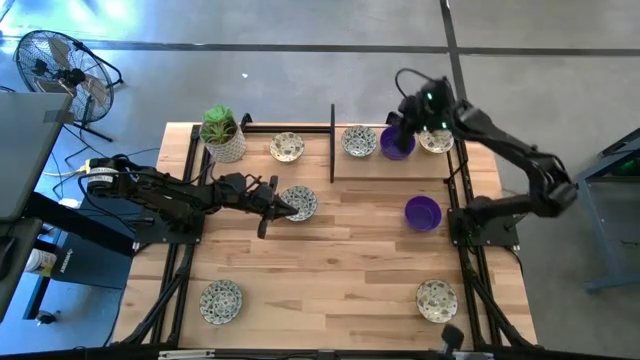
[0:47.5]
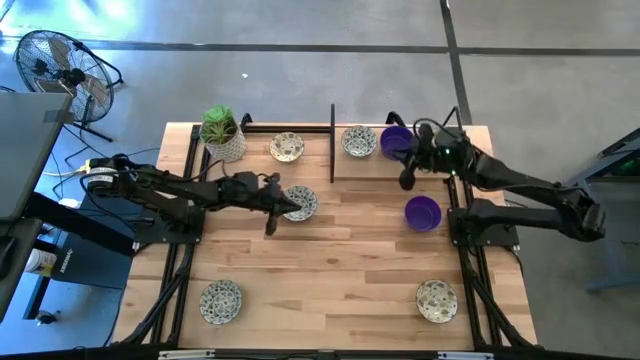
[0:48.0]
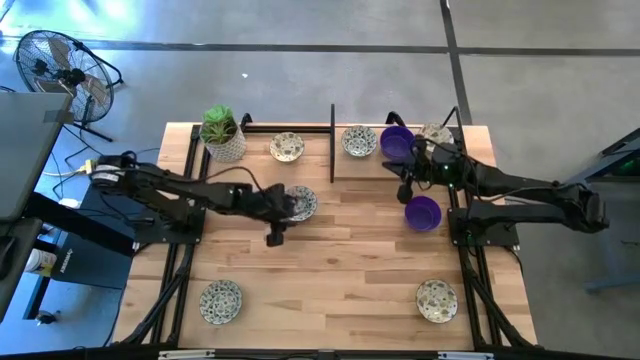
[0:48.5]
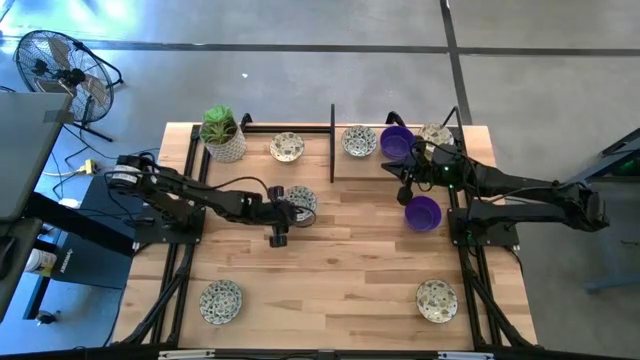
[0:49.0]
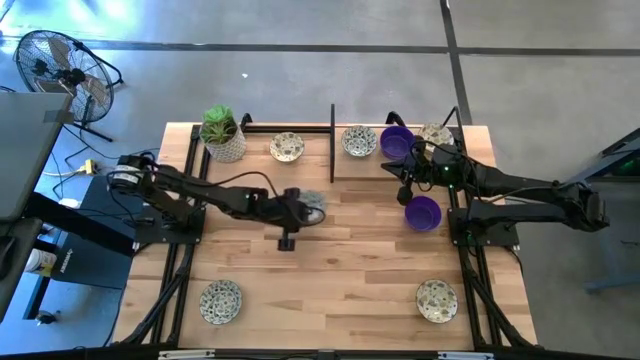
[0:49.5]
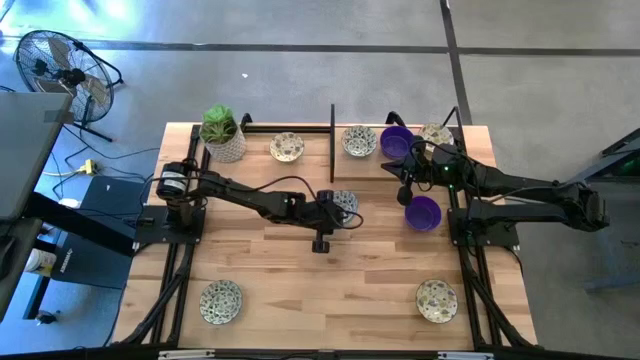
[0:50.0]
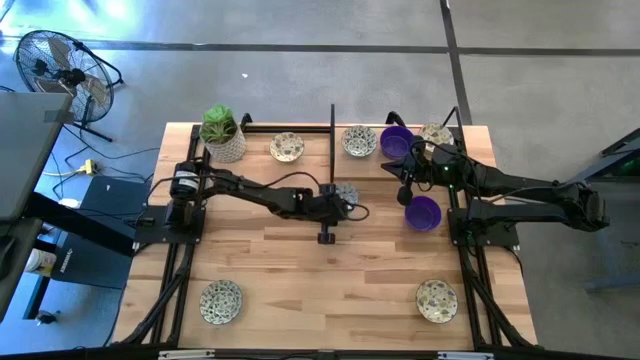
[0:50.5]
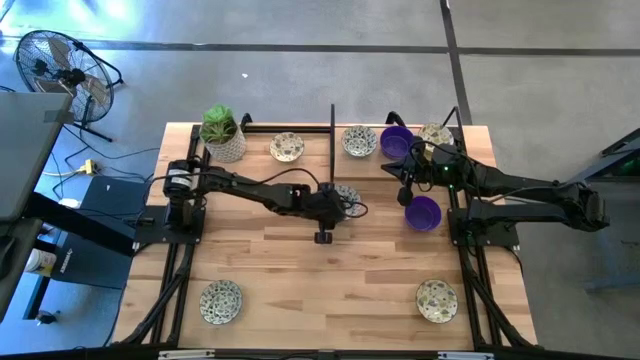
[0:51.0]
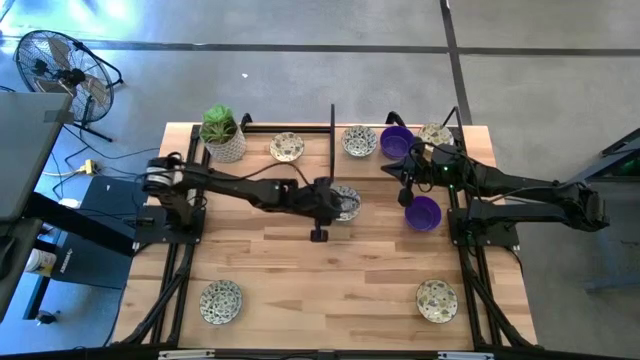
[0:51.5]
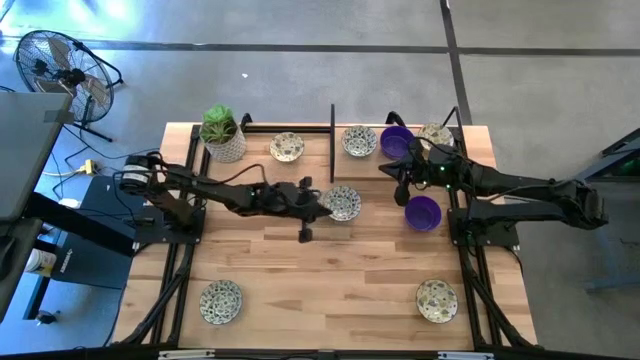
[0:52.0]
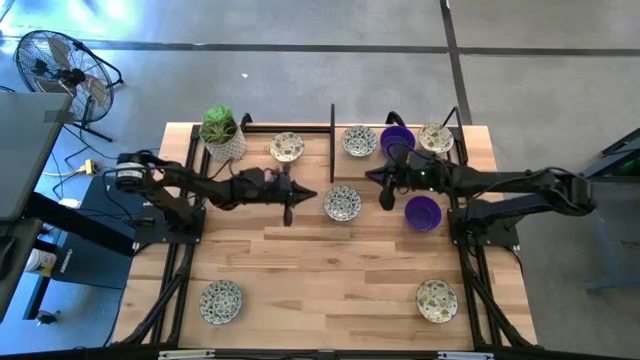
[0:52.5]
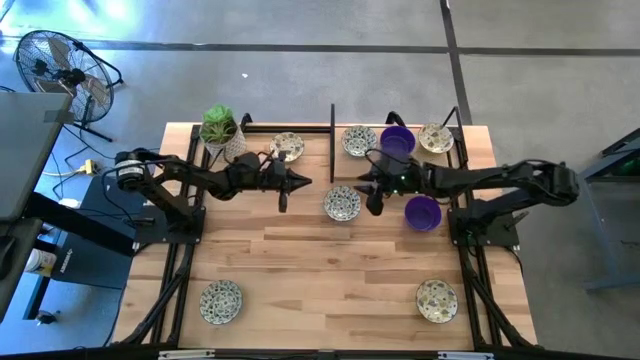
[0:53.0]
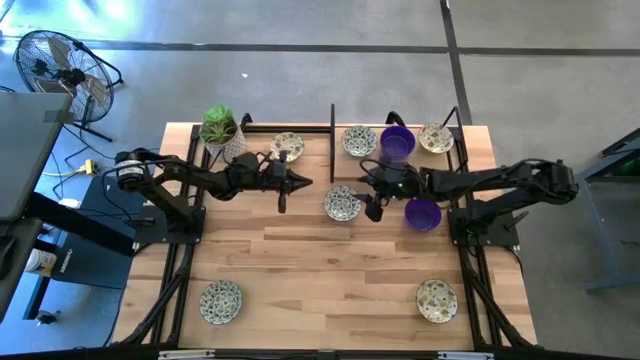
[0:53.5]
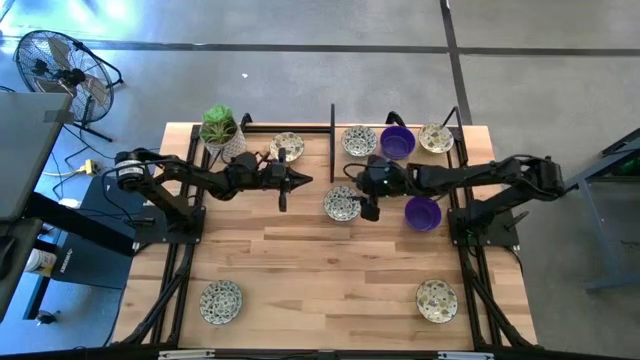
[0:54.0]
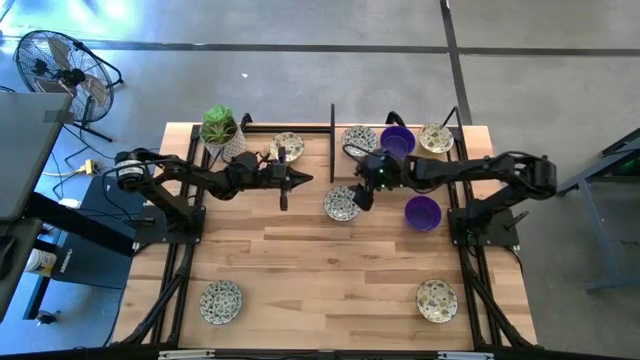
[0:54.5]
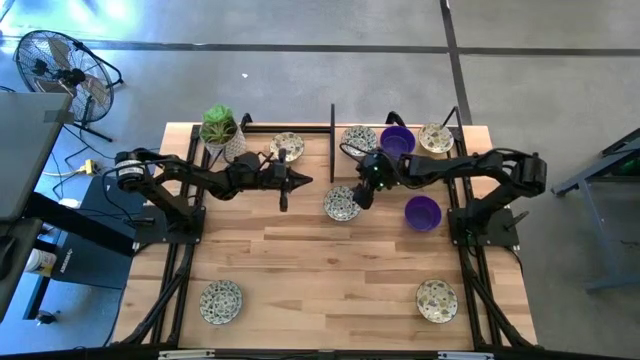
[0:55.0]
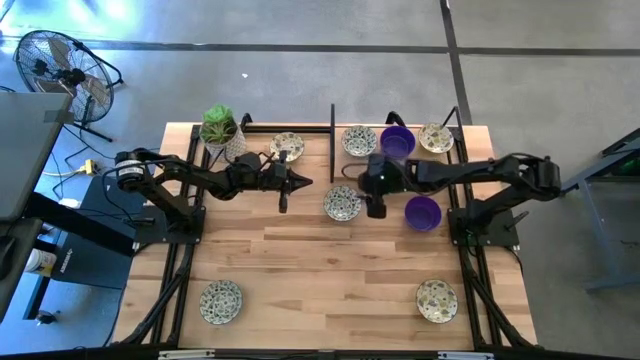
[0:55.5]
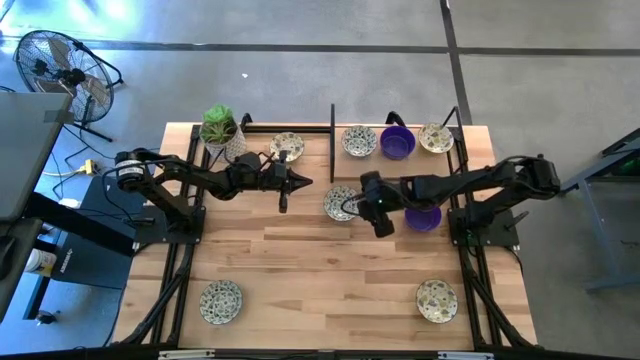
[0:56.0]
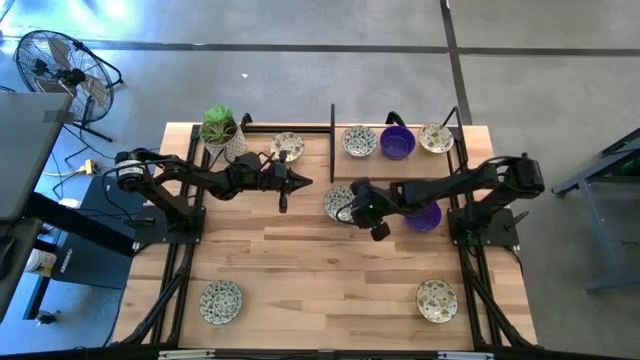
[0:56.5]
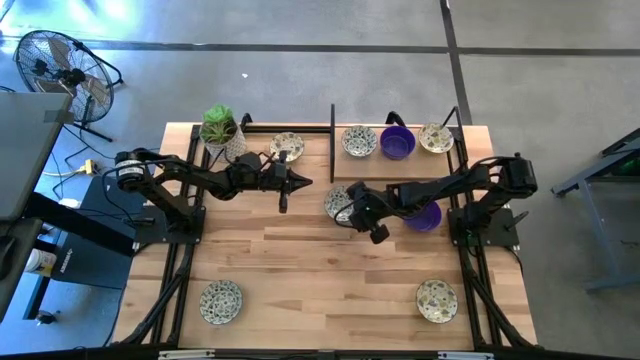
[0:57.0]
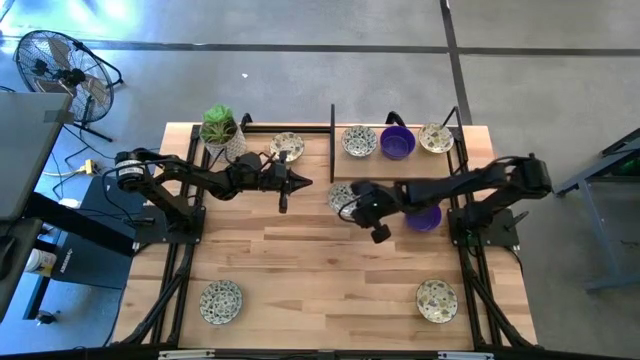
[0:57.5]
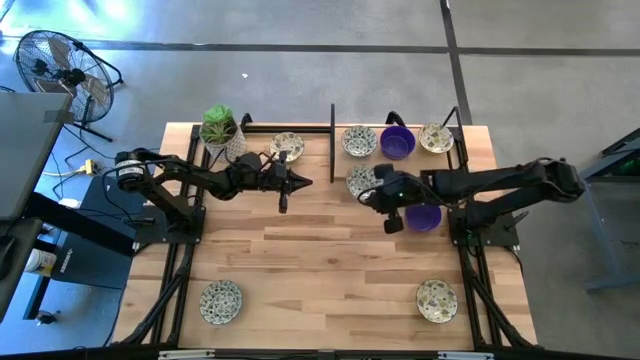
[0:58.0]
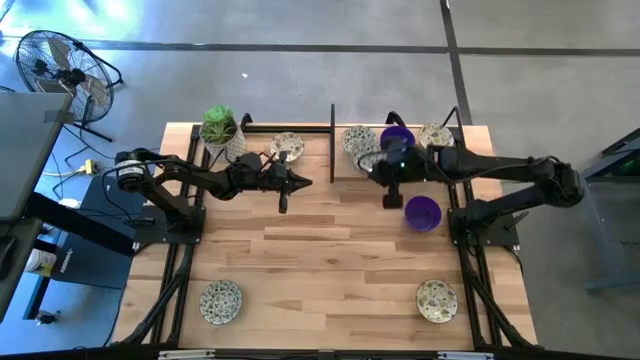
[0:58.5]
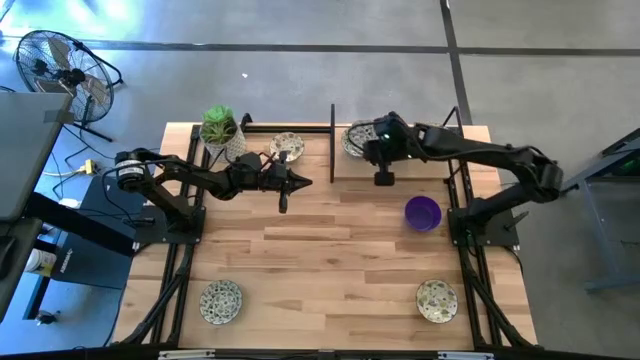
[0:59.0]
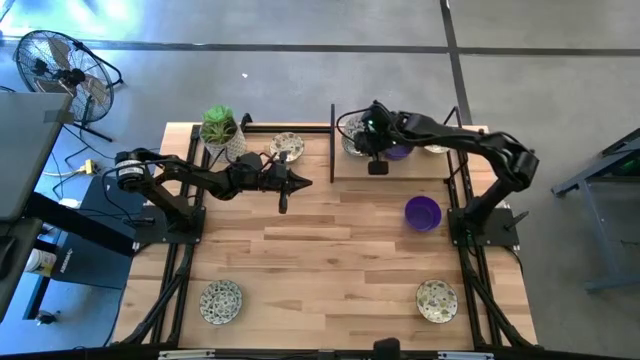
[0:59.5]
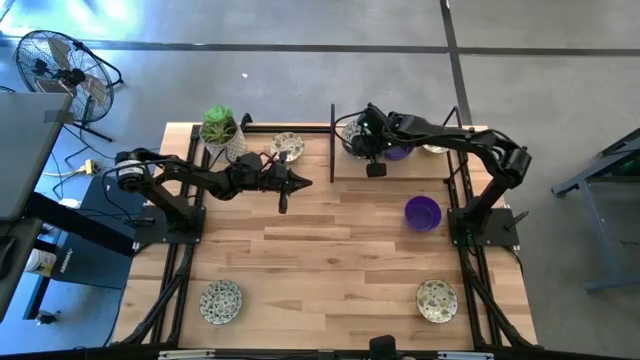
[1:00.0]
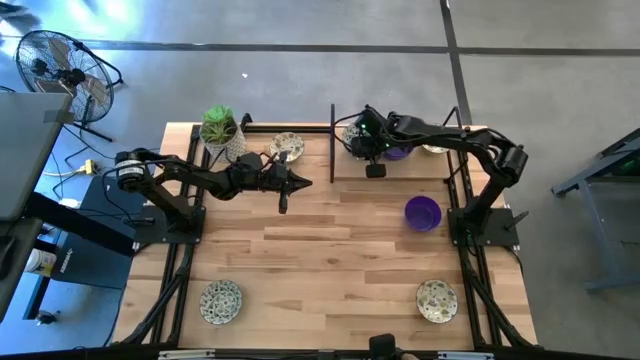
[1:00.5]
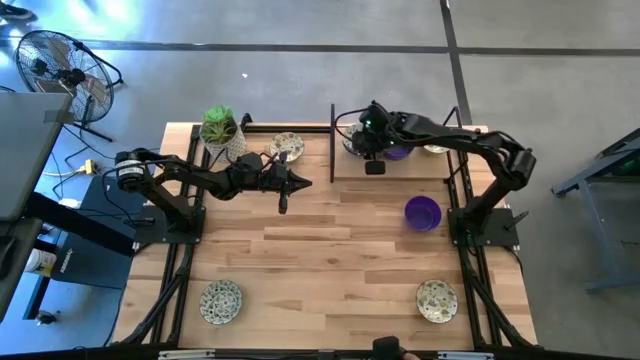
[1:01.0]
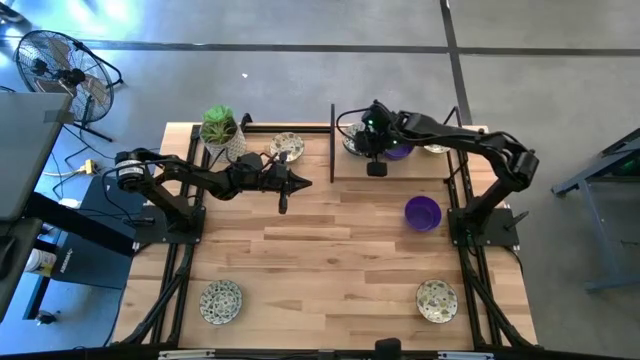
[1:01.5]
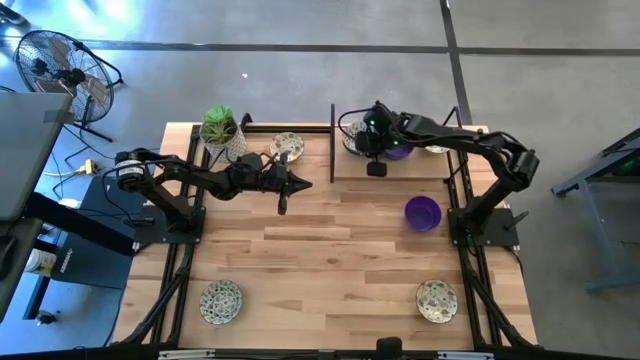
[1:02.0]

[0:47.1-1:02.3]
Task: Pick & Place Mini bowls
Stack the top light blue bowl on top of the light blue bowl on the shelf

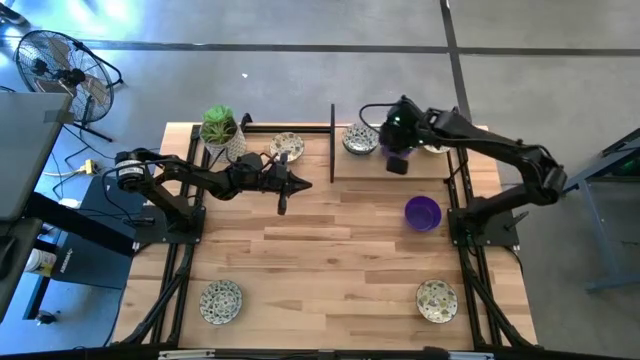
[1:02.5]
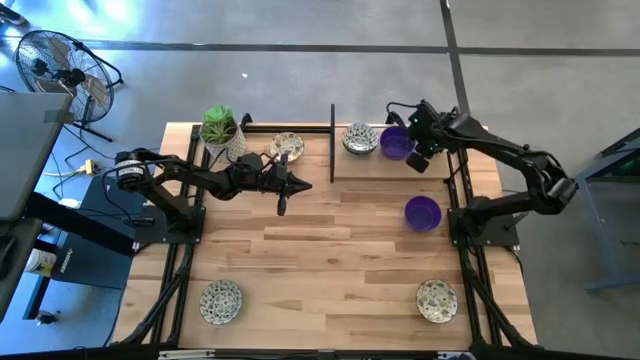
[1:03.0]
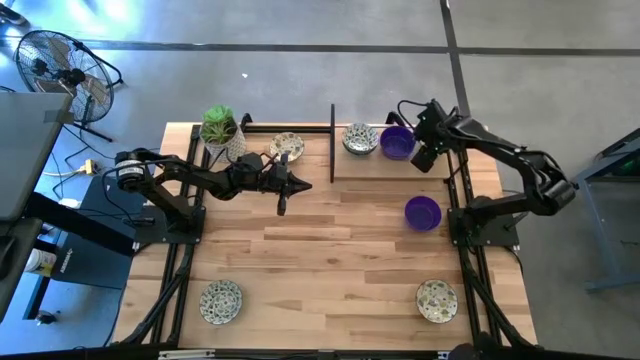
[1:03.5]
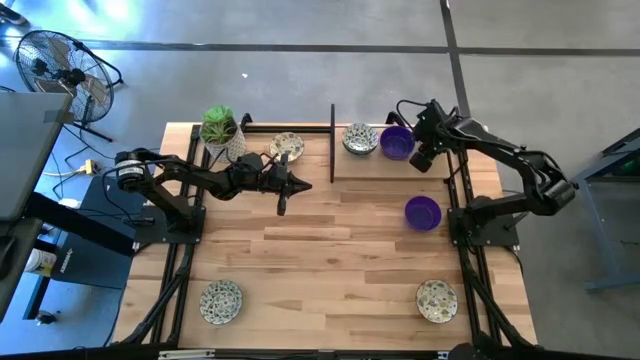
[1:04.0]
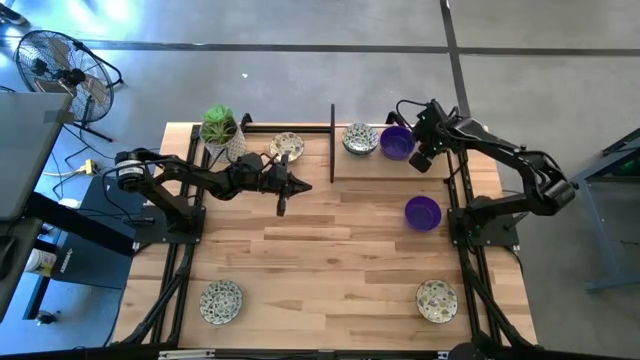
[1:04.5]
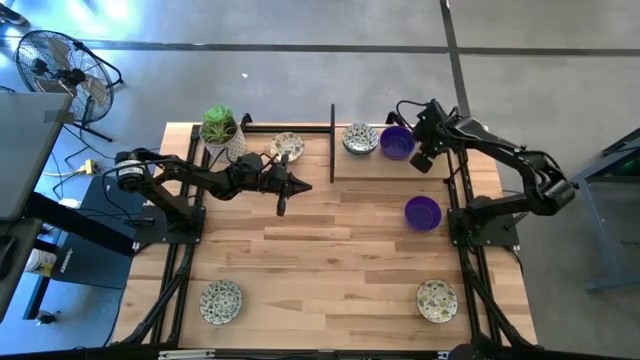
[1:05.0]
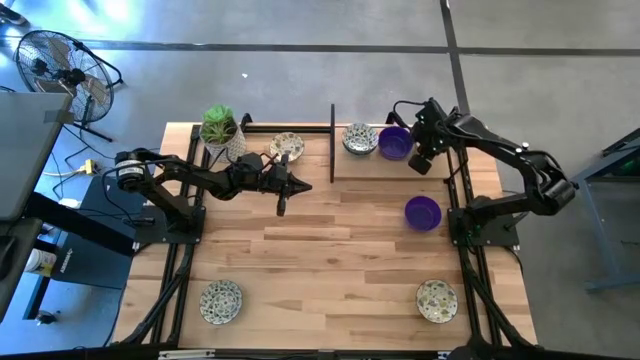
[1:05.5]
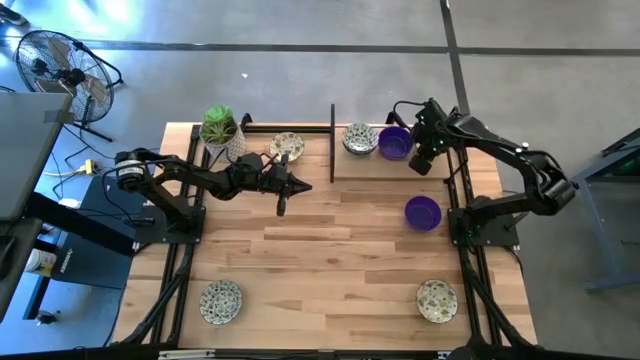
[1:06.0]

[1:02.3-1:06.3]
Adjust the yellow bowls on the shelf

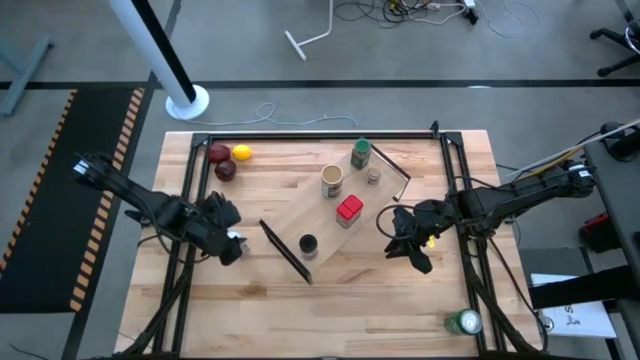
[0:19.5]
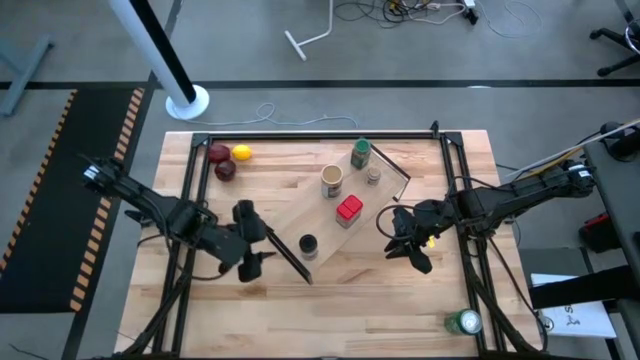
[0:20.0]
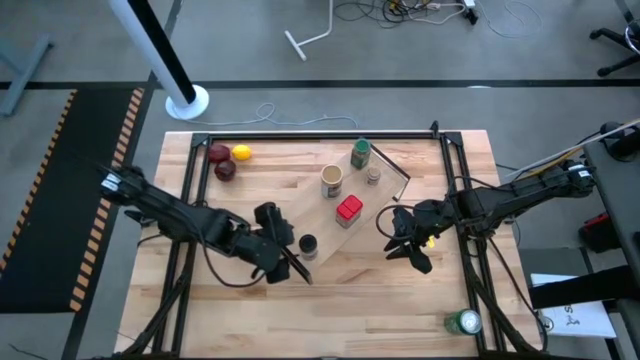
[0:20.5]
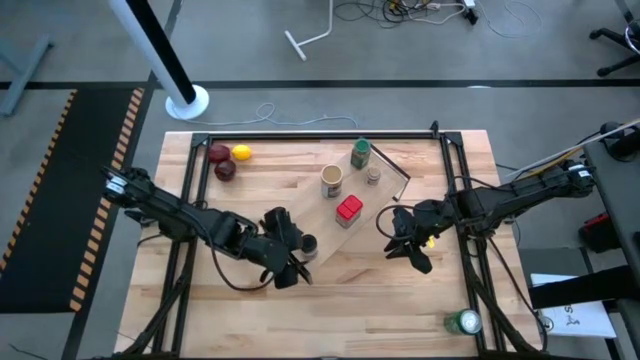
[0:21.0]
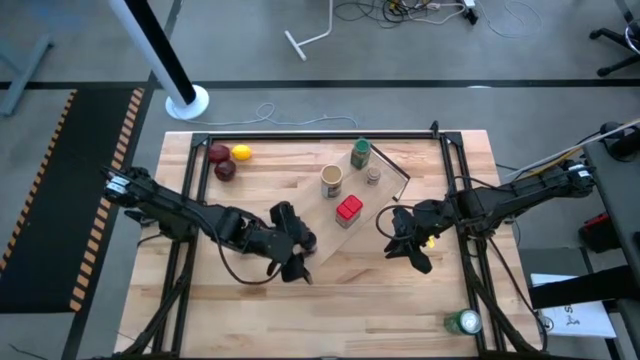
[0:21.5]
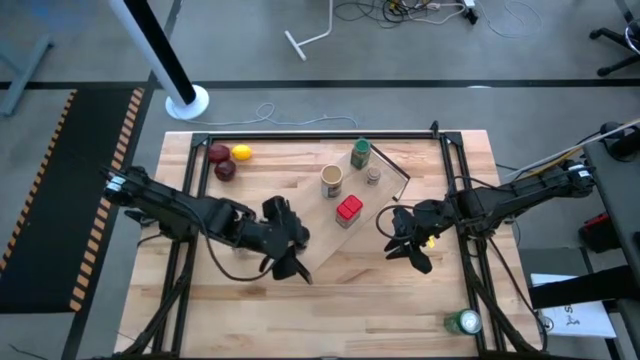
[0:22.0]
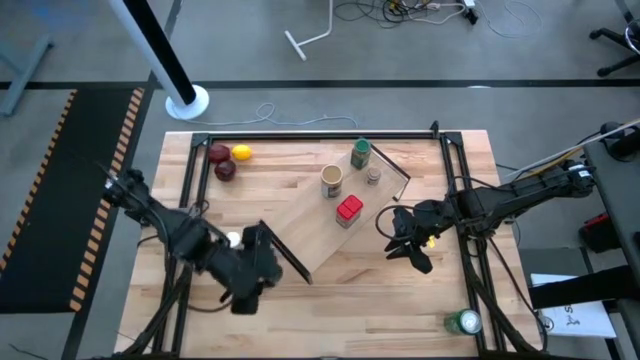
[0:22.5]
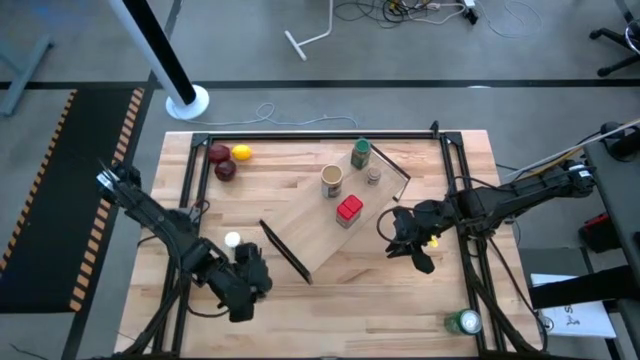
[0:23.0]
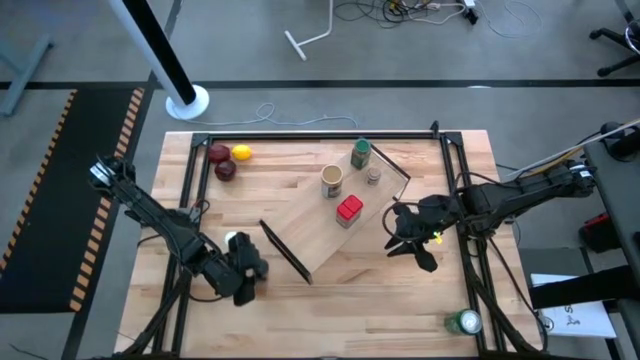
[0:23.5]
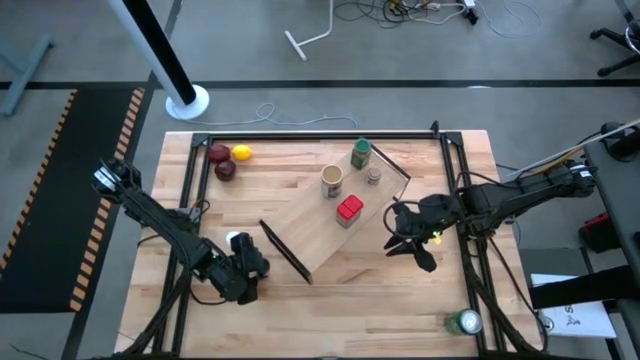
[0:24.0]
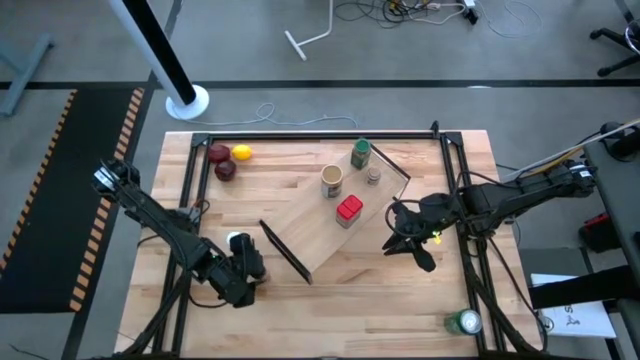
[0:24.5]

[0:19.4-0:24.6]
Task: Shelf spices
Remove the black seasoning bottle from the shelf
